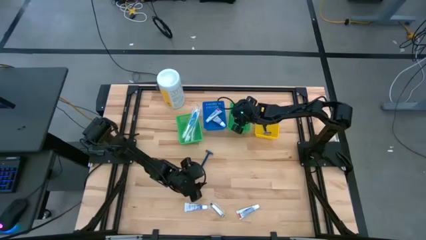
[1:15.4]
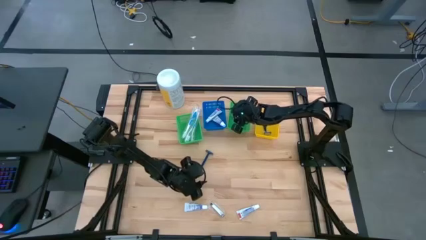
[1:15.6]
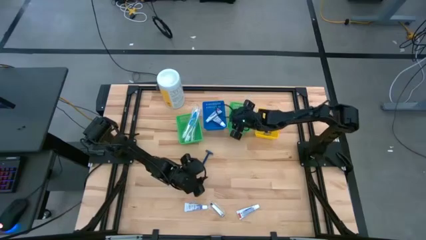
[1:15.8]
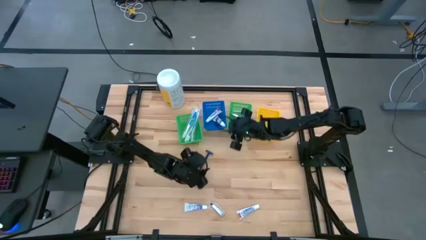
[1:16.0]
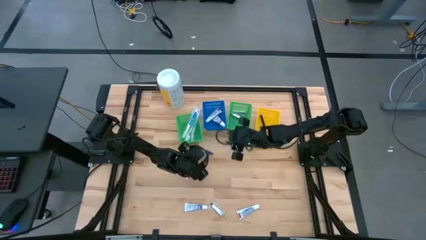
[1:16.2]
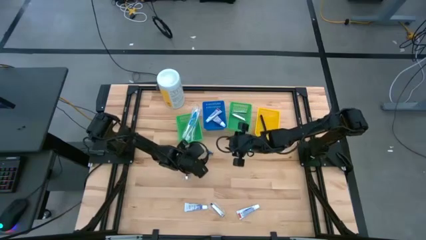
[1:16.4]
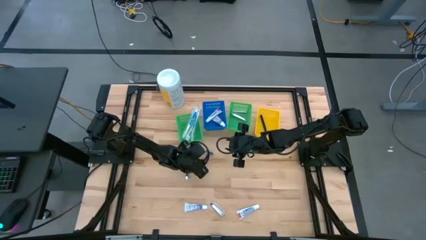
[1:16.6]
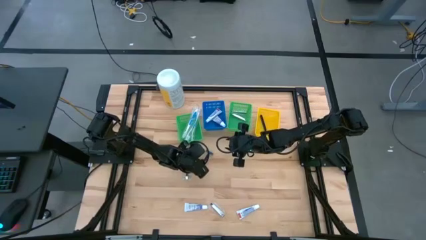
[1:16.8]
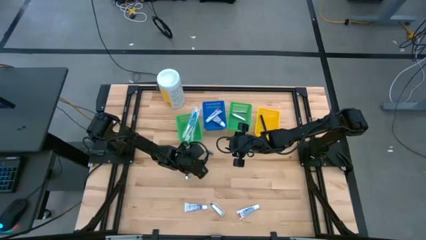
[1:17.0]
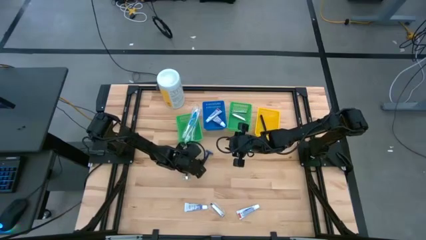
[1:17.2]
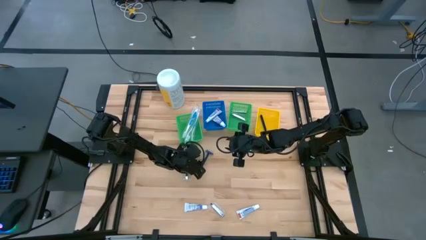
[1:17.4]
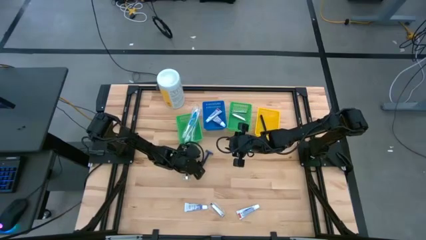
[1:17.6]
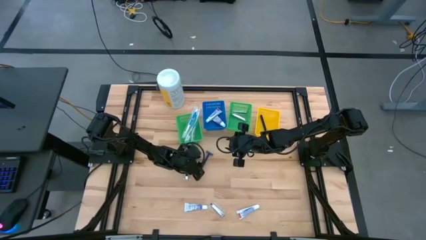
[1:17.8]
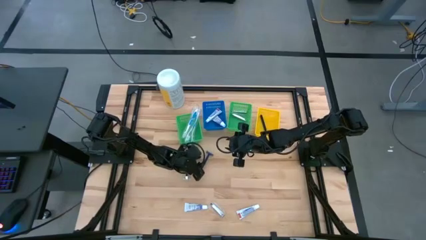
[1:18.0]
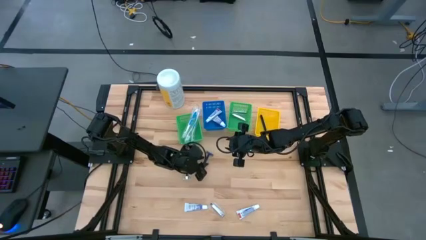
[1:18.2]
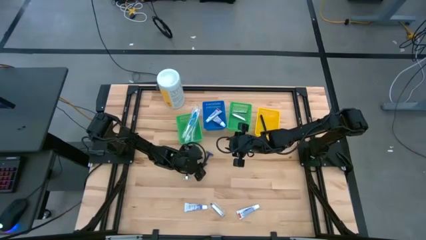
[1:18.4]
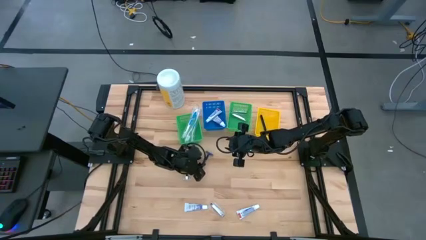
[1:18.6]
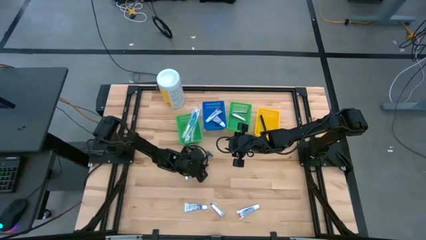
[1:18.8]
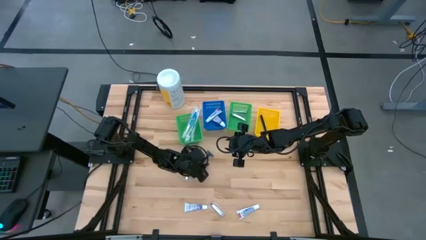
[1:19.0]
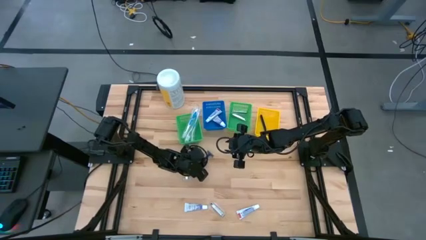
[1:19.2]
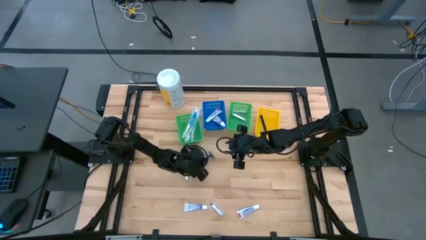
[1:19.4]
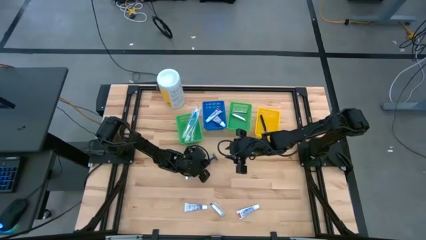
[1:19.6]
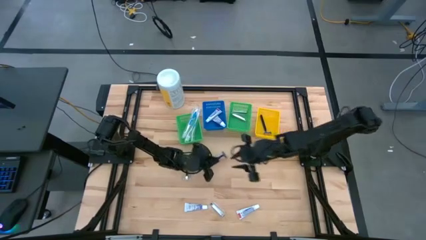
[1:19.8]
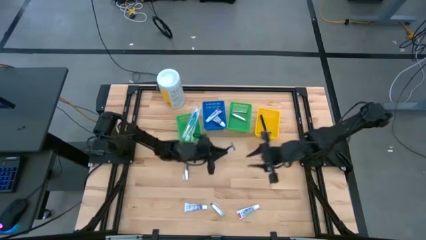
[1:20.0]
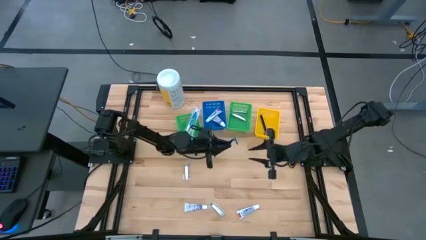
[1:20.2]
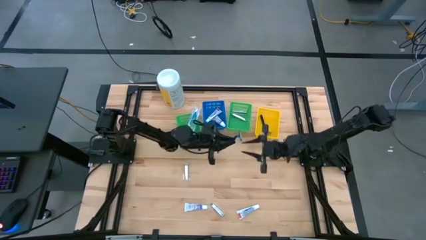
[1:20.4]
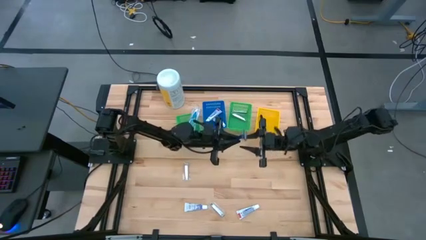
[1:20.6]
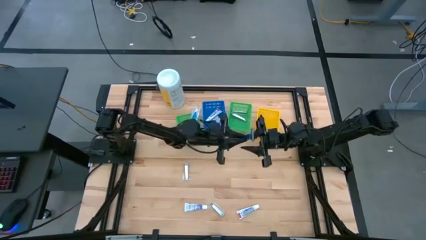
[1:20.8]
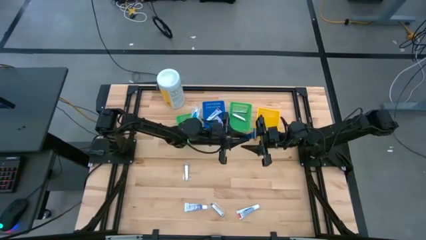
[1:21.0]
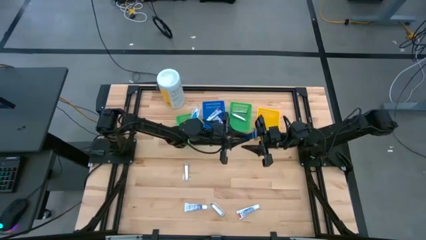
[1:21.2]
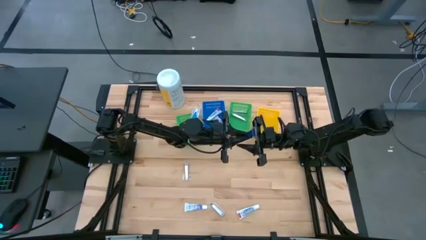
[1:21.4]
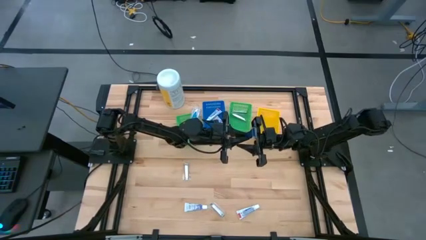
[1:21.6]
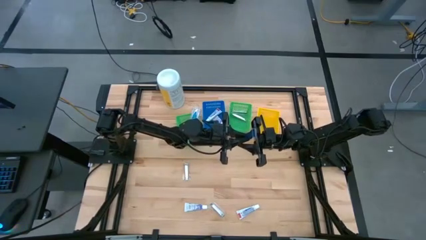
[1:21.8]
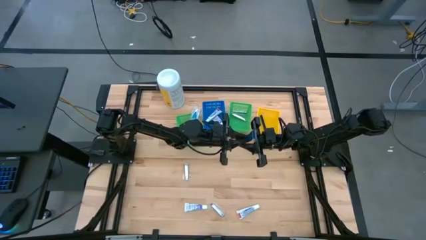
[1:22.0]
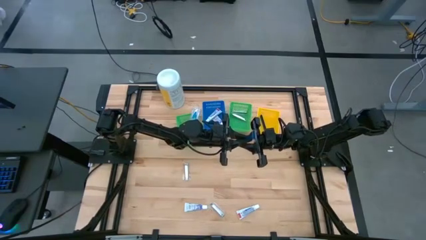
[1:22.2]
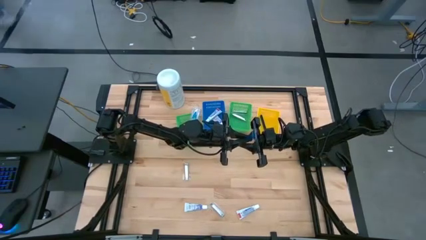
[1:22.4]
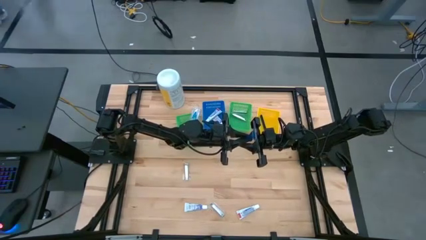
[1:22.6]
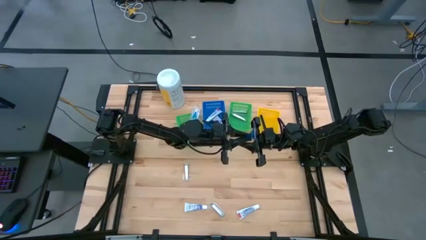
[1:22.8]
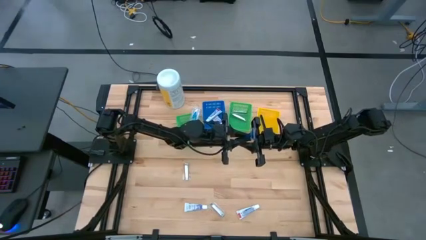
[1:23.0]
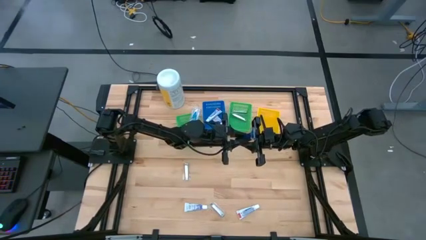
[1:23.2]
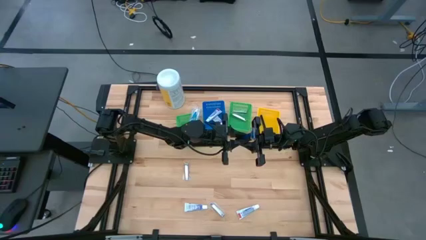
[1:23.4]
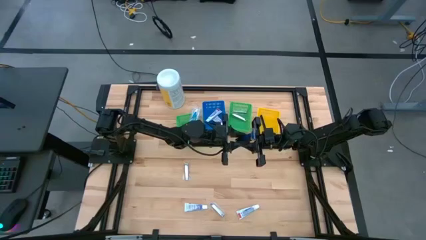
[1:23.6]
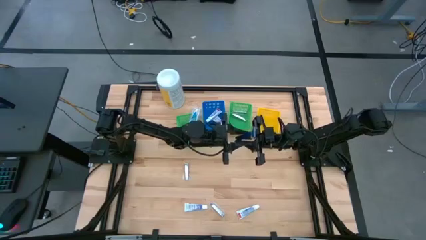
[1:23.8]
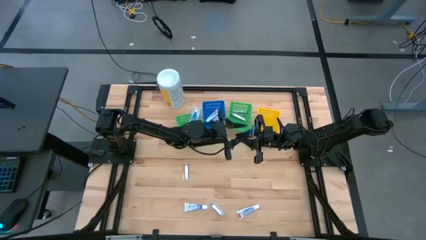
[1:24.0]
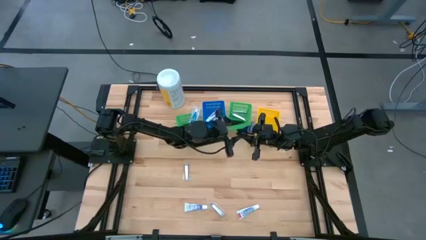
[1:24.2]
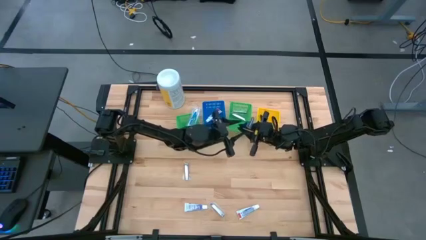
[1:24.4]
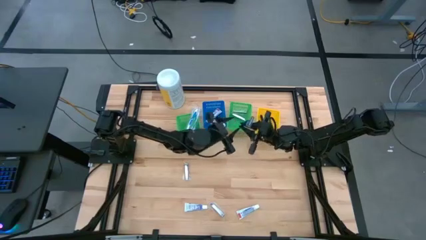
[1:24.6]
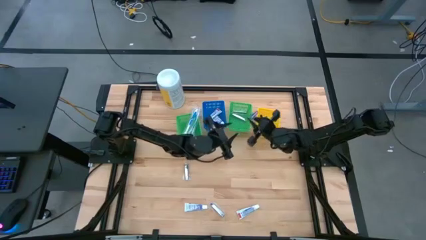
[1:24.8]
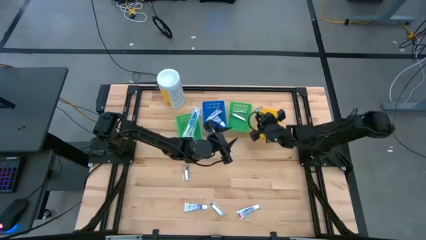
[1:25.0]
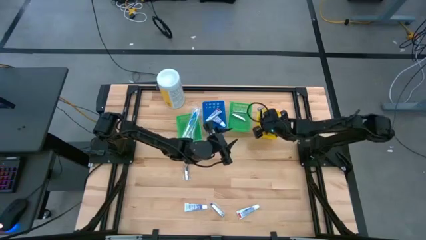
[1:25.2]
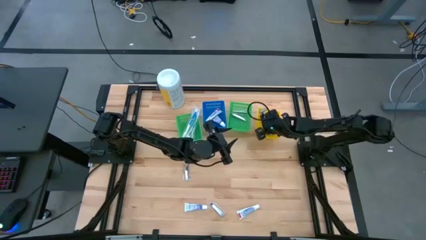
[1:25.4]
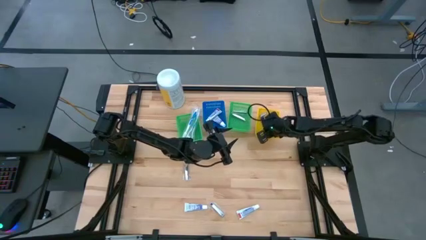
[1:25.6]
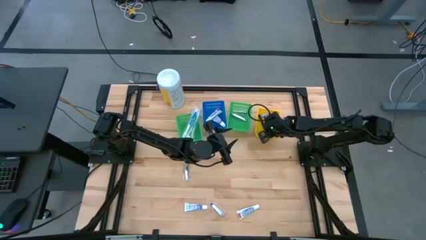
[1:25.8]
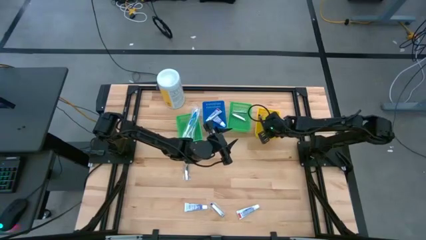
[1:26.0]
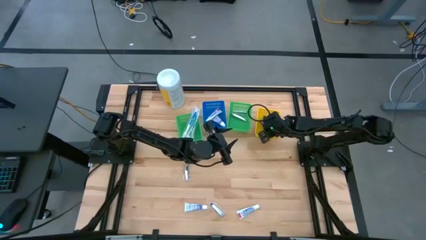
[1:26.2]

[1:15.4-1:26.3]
Task: Pick & Place Travel size toiletries
Put the blue razor into the yellow basket

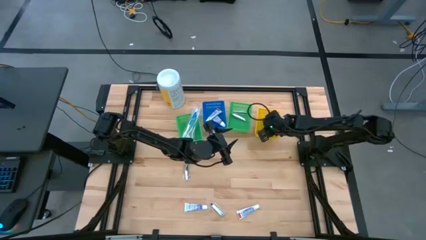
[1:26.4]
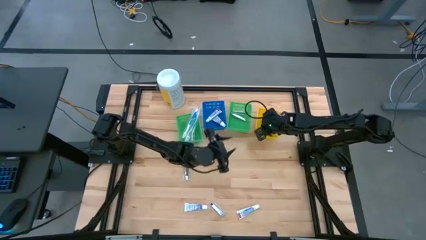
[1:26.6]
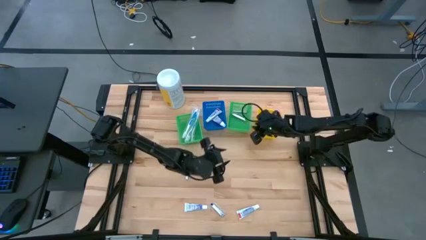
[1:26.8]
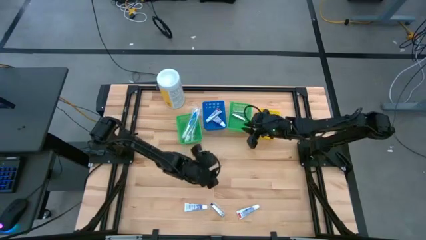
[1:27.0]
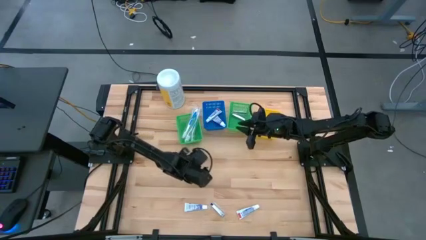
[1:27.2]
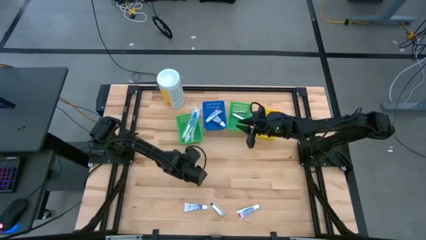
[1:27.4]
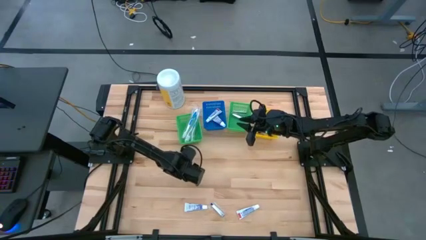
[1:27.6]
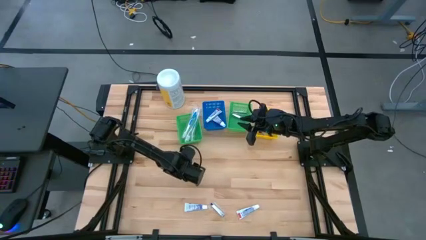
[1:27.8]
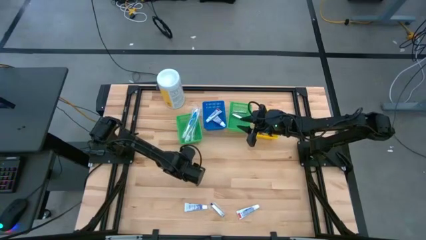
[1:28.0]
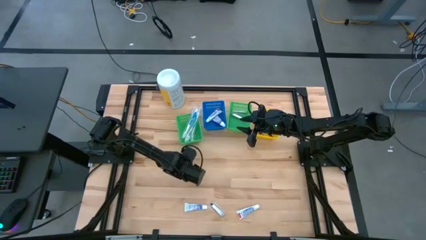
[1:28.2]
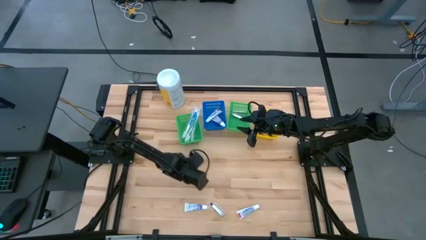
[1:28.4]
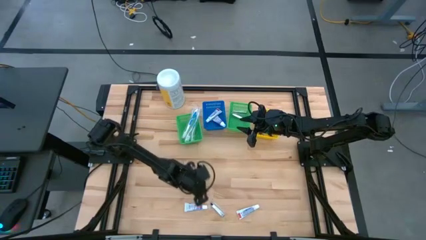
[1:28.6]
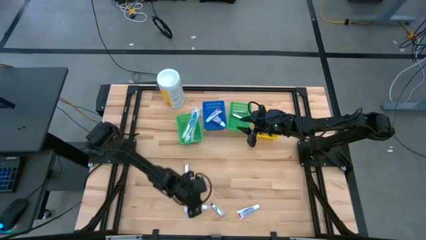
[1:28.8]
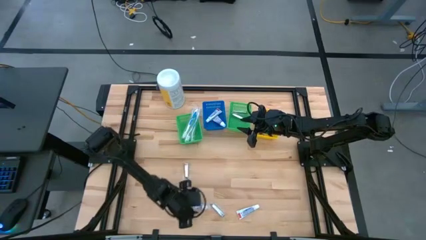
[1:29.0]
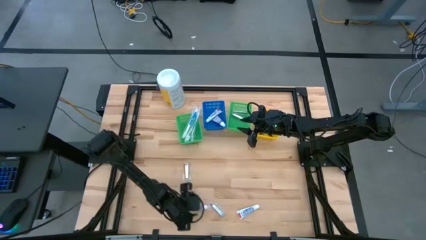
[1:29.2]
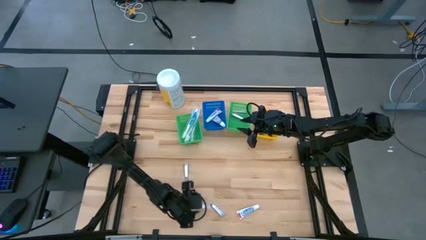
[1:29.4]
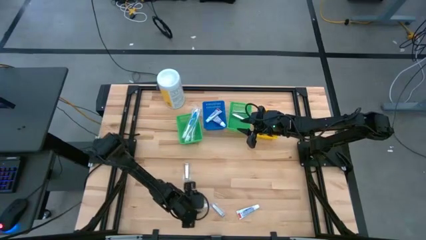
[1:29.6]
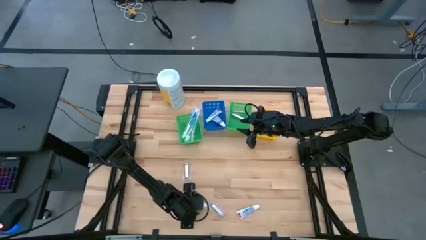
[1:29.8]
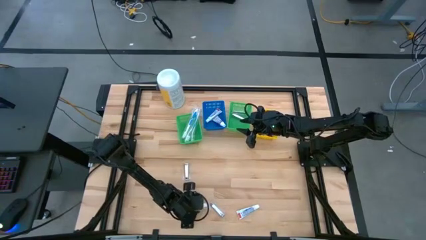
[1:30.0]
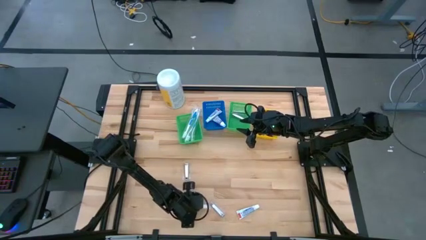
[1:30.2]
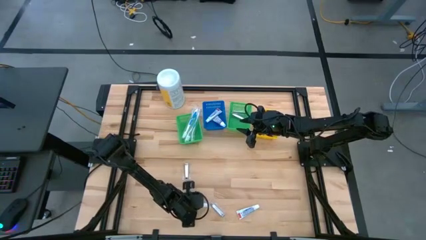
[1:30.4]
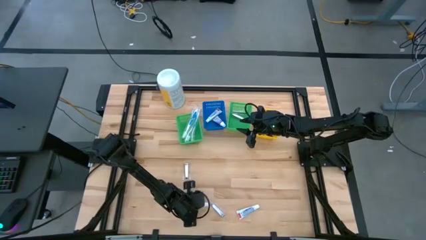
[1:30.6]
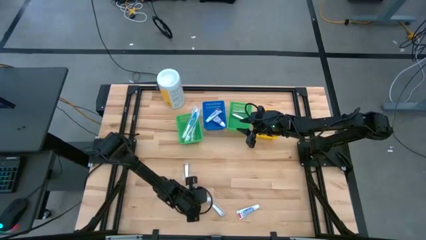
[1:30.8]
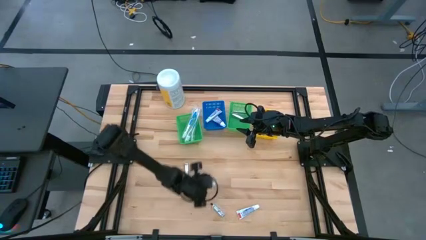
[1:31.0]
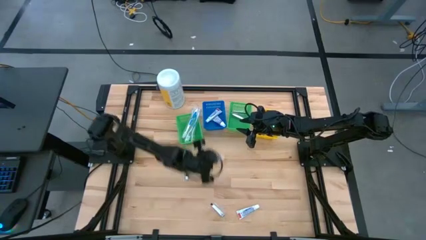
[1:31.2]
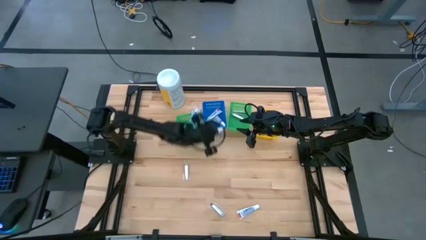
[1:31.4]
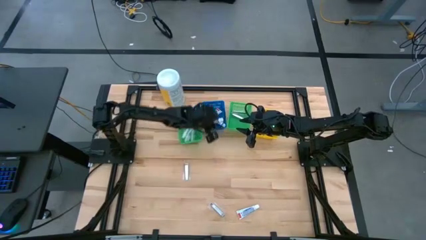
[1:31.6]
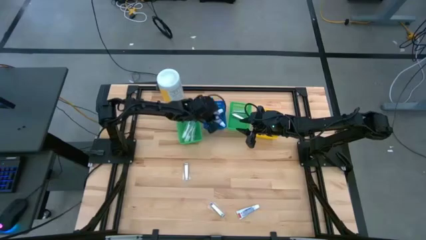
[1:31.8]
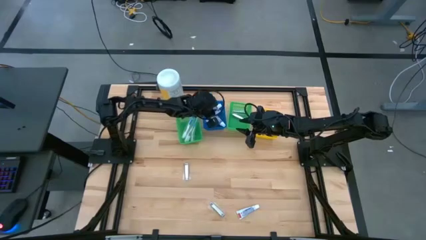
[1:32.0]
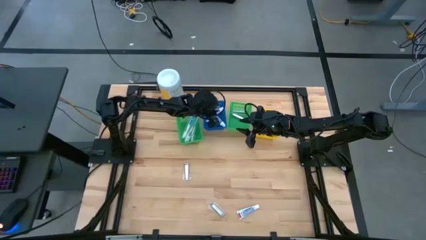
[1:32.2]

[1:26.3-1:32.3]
Put the white toothpaste into the blue basket
